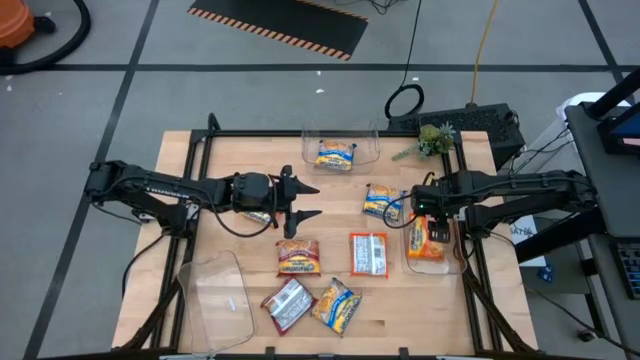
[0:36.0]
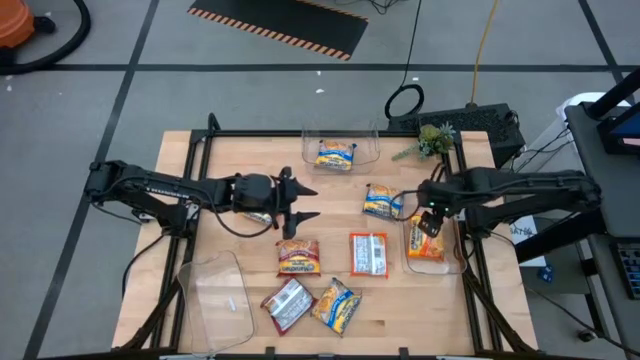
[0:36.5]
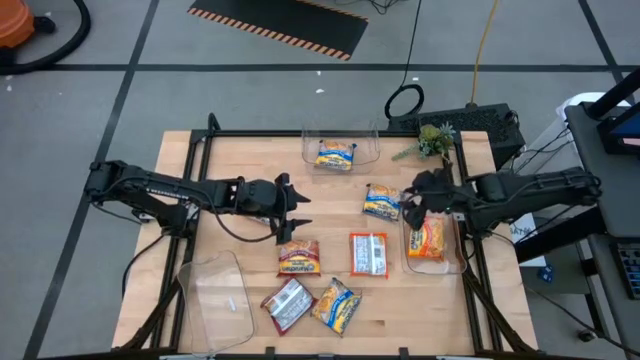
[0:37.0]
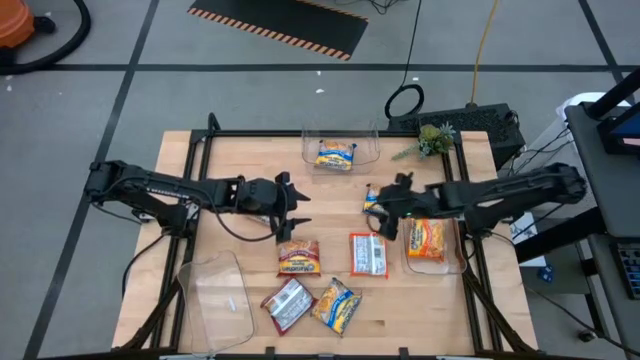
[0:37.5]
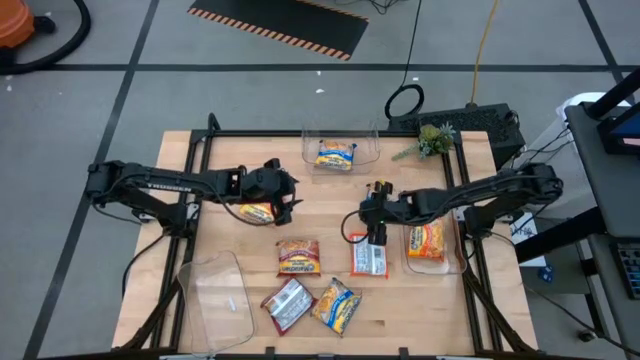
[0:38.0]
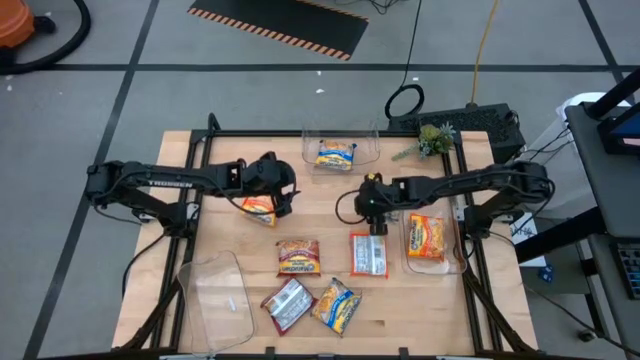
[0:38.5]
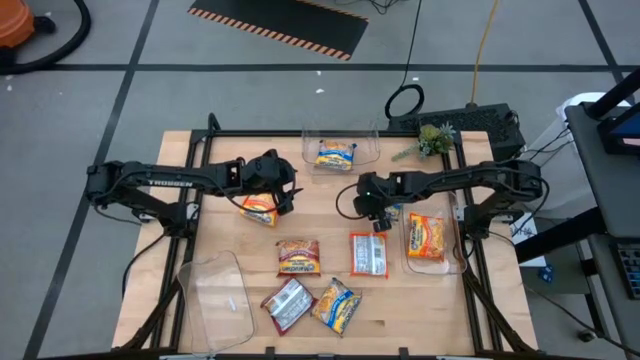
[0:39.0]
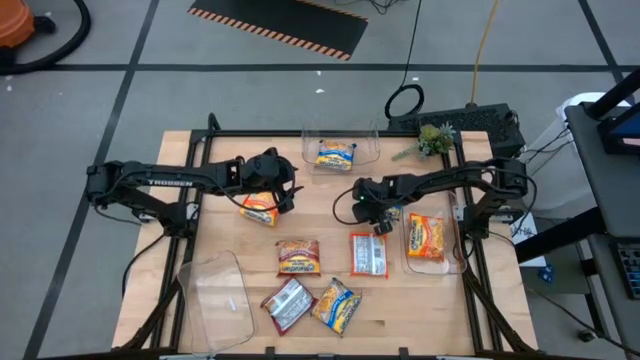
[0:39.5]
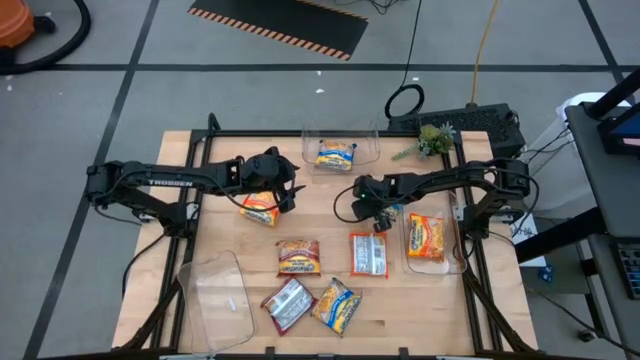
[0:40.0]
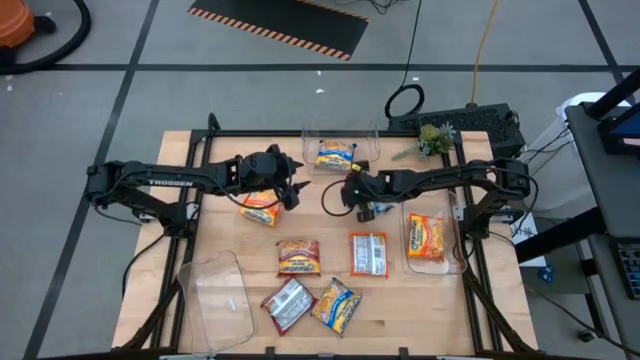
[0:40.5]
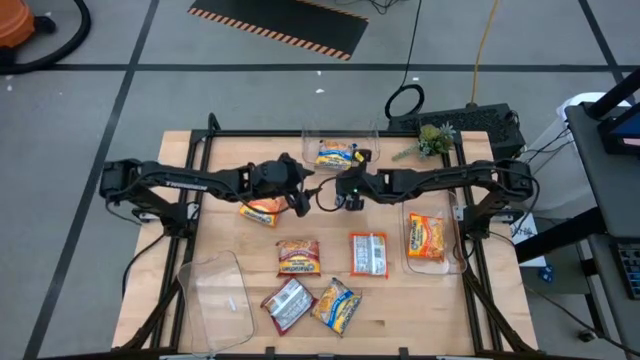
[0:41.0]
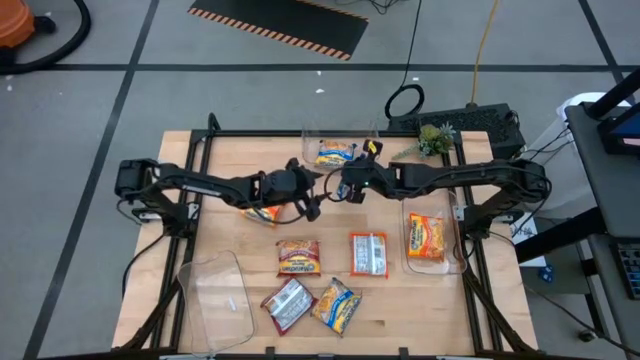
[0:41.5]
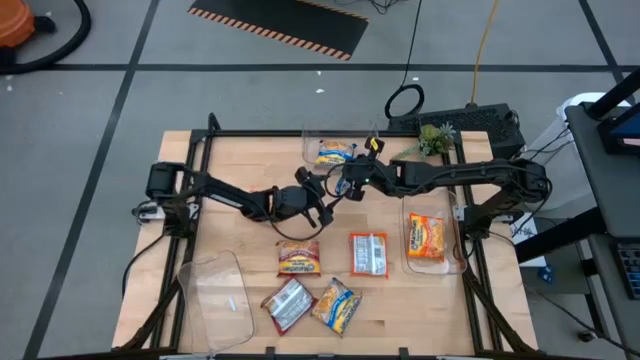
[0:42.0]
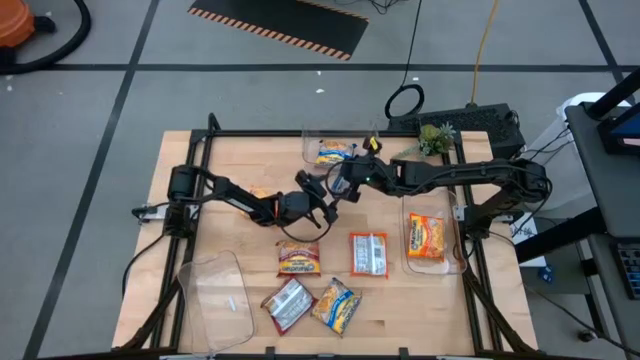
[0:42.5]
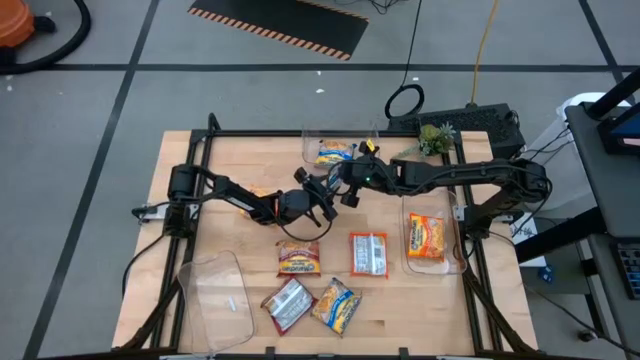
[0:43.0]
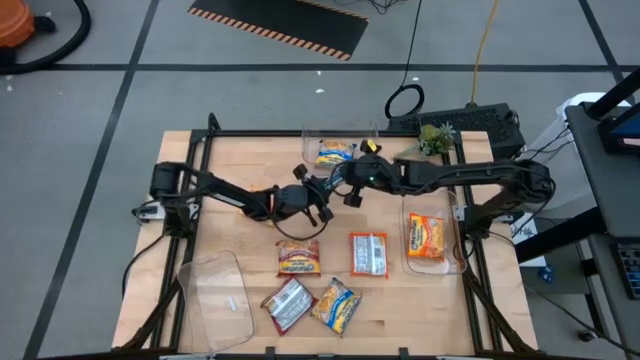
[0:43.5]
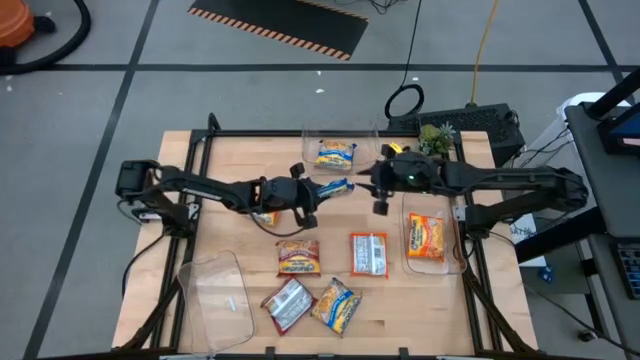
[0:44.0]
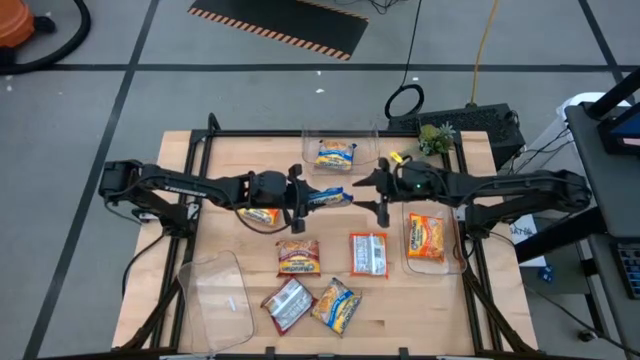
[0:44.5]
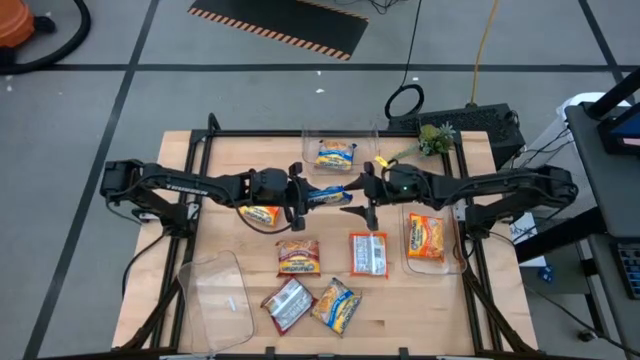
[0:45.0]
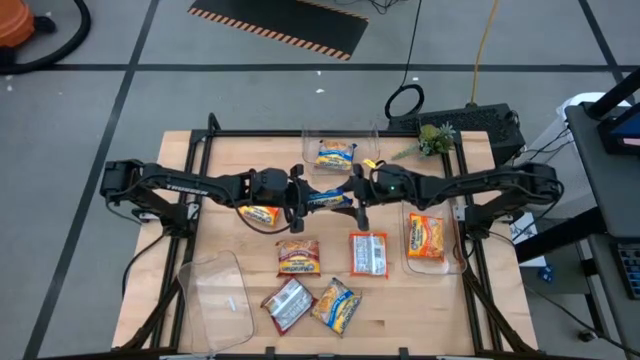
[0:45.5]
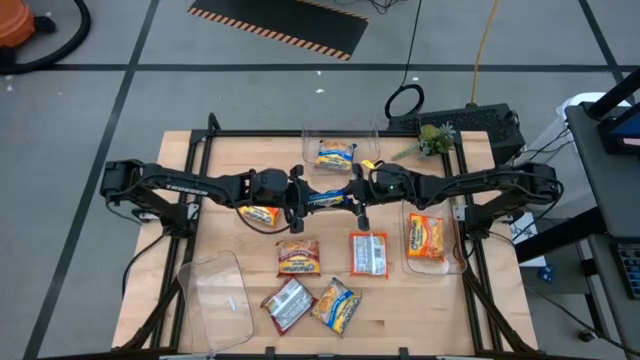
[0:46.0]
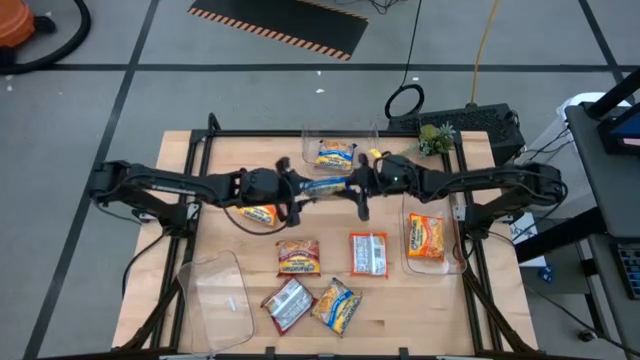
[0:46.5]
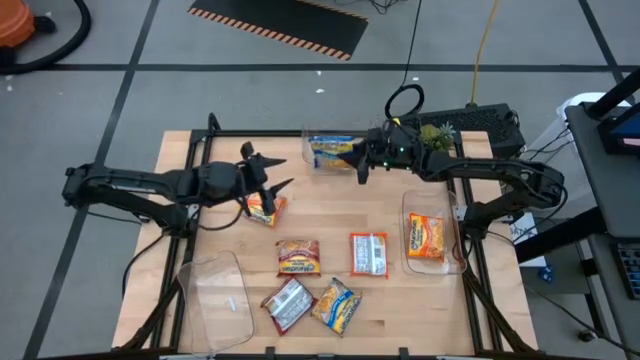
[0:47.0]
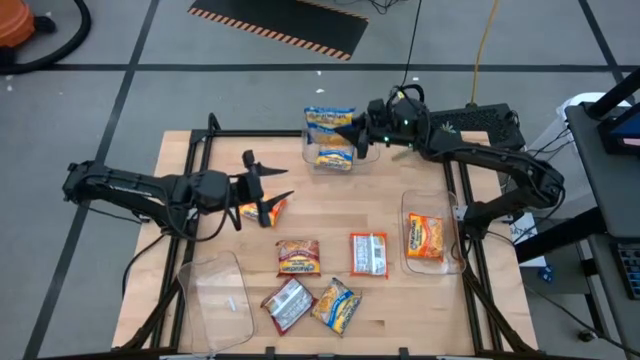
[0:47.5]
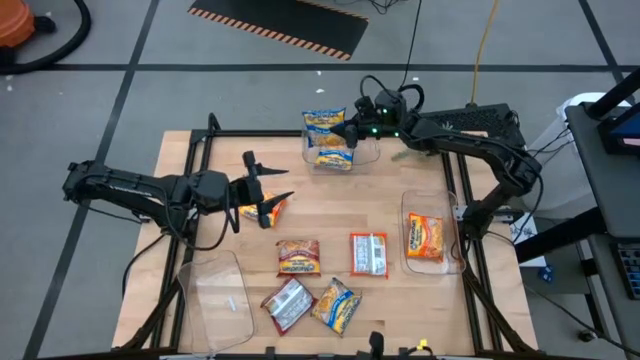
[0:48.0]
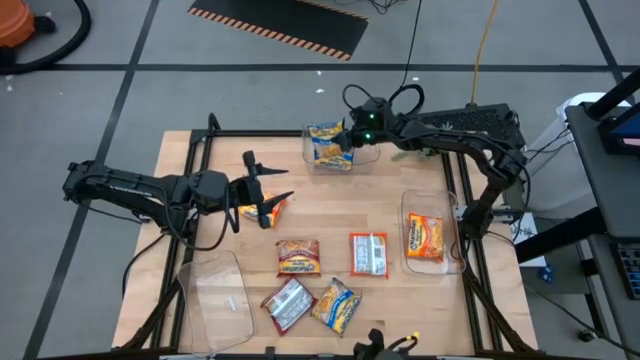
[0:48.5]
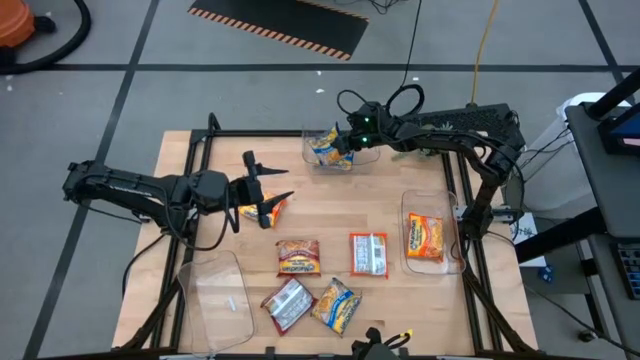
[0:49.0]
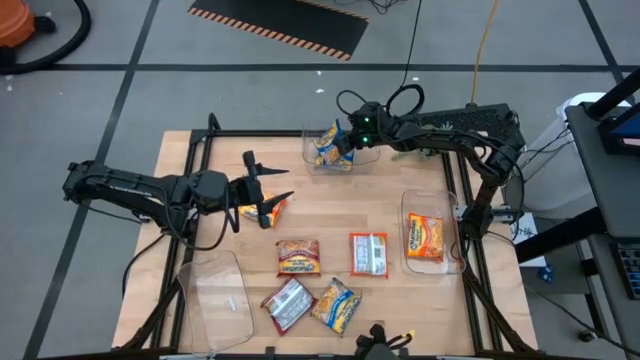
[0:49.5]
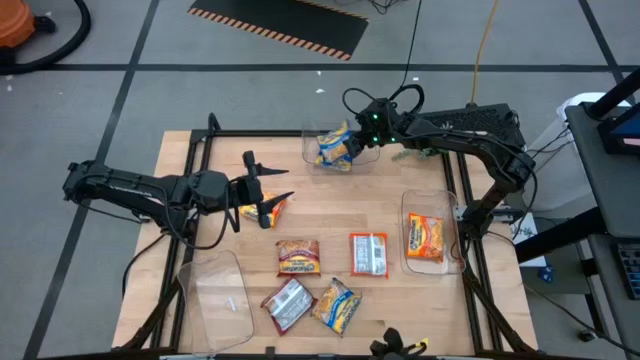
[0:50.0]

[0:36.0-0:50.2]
Task: Sort Maruchan noodles
Put the top blue noodle pack into the top transparent bin

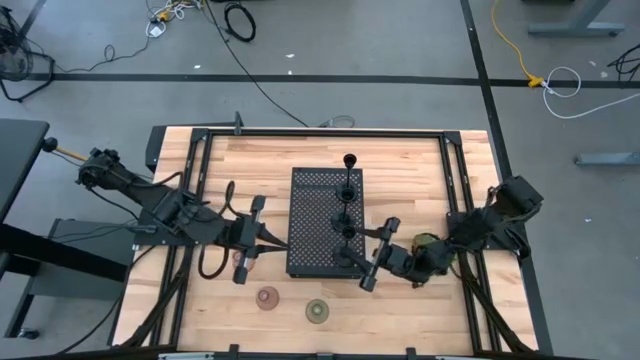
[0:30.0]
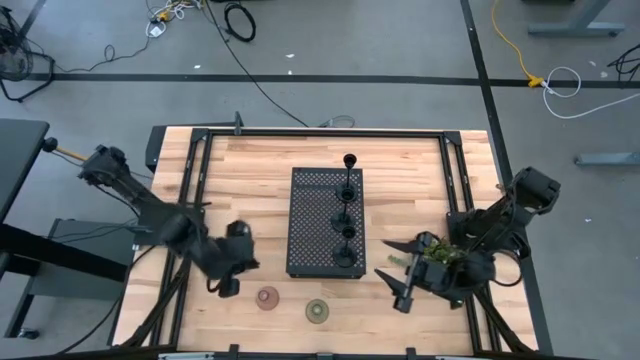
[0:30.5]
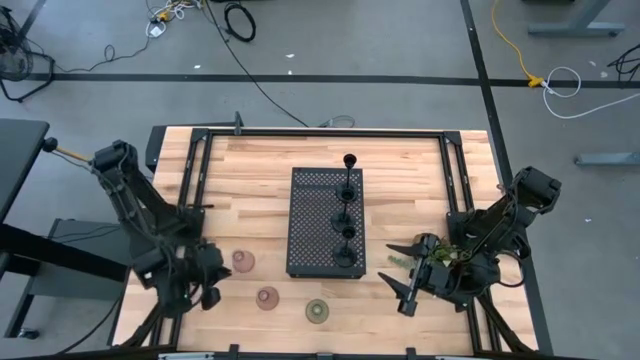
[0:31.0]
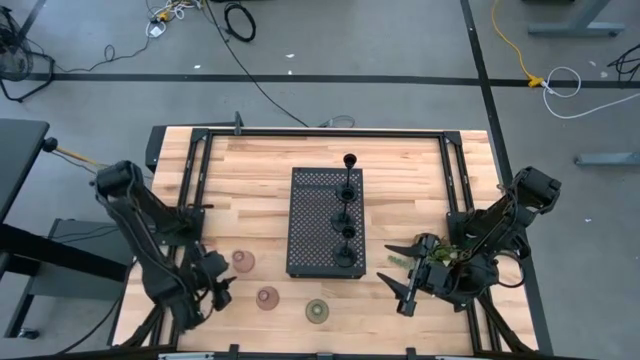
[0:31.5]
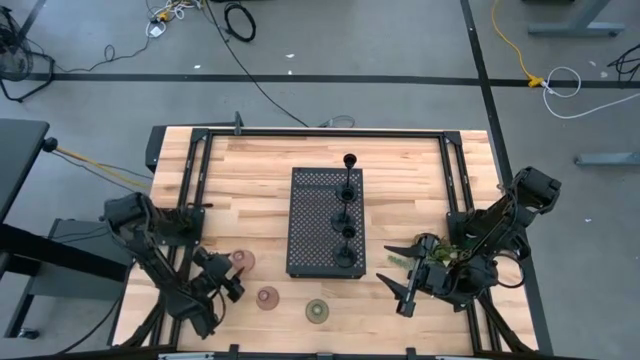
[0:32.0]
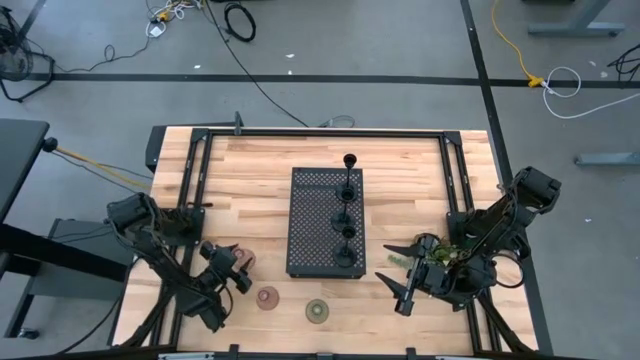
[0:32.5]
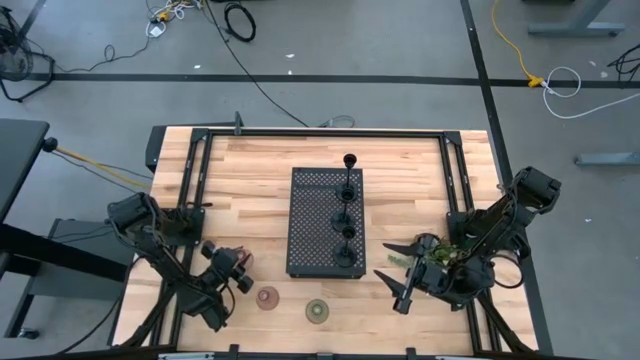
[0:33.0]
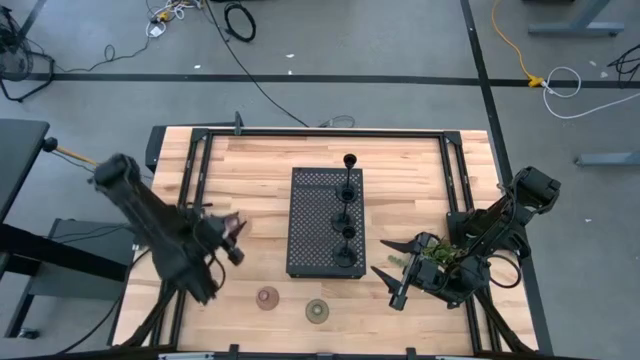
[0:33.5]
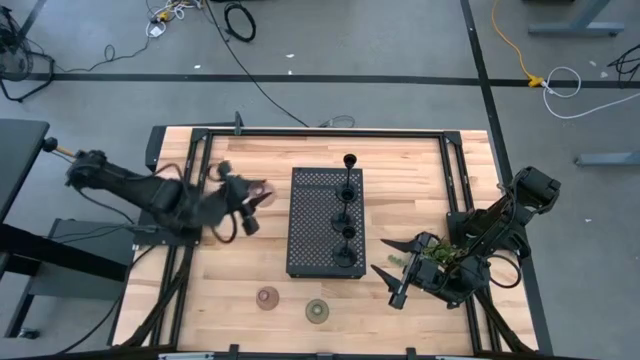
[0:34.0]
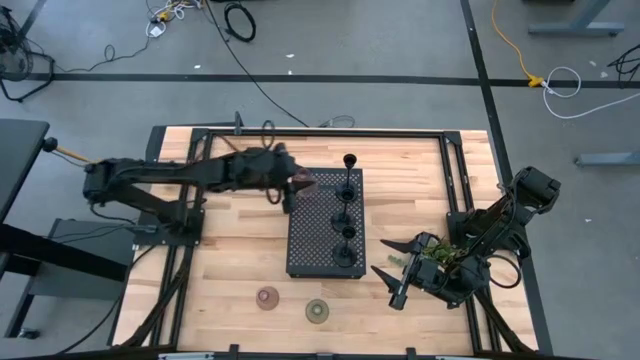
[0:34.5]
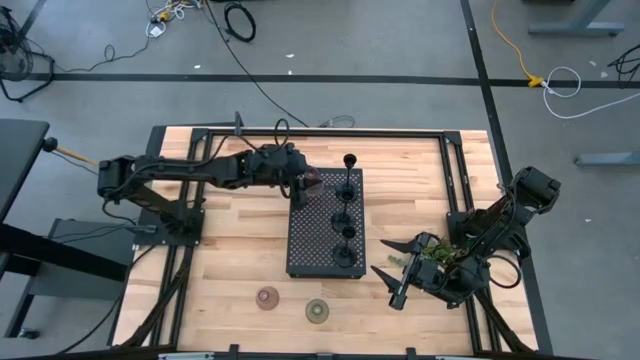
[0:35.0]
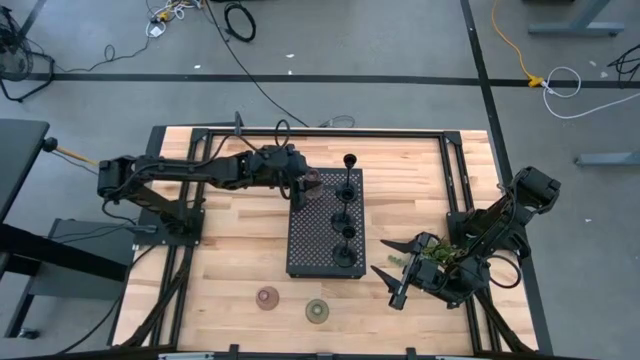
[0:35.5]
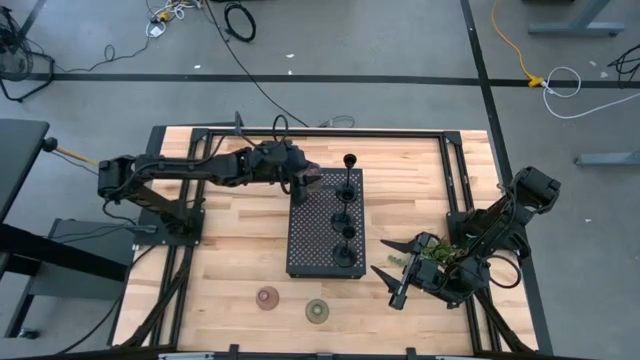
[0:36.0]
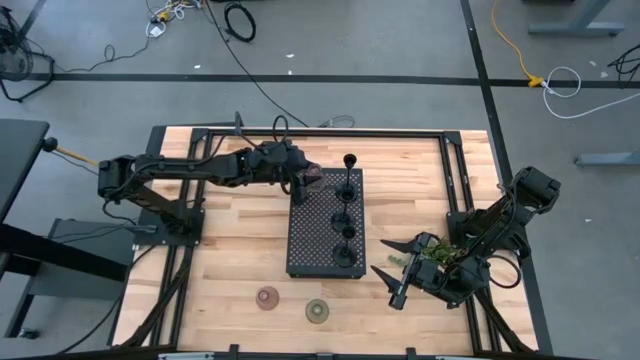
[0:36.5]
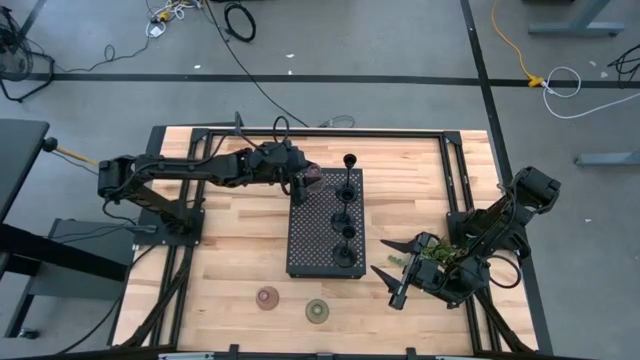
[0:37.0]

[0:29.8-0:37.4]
Task: Pick & Place candle stick holders
Put the pink glass candle holder on the shelf
